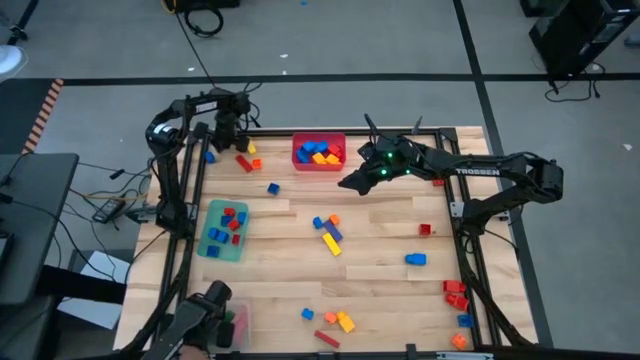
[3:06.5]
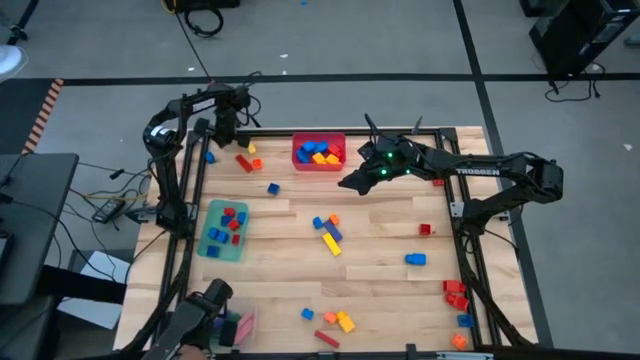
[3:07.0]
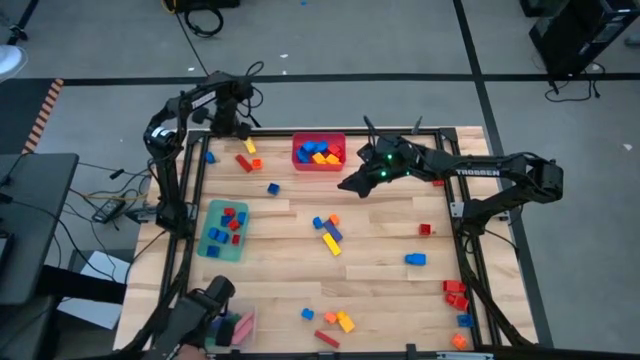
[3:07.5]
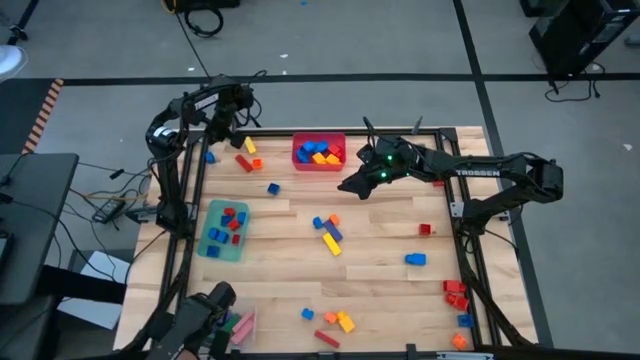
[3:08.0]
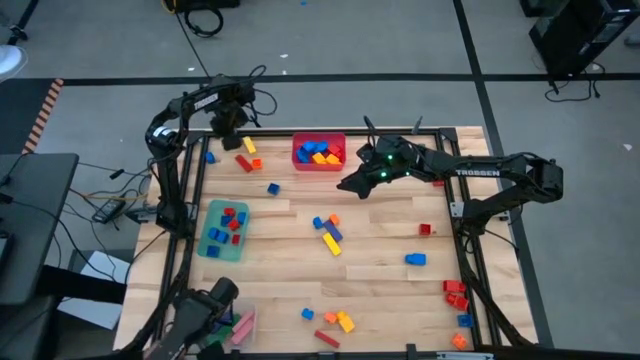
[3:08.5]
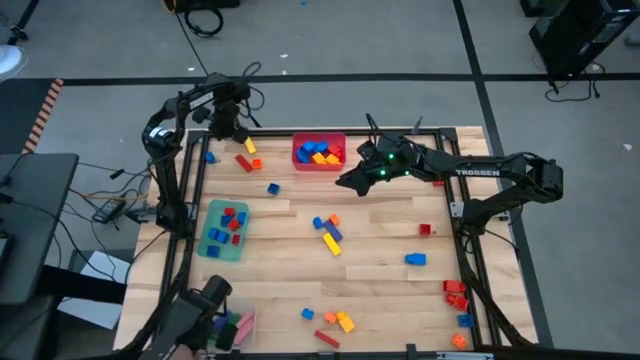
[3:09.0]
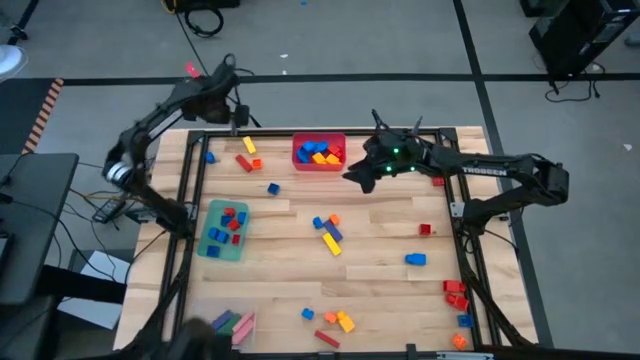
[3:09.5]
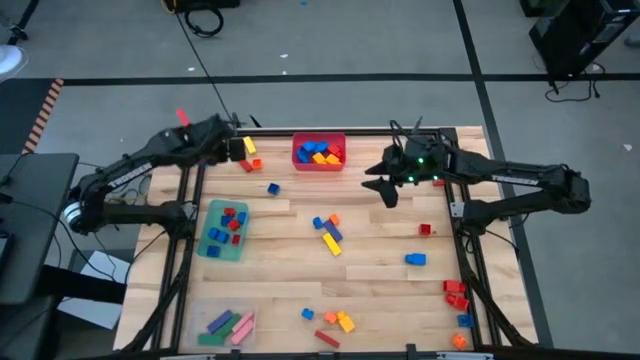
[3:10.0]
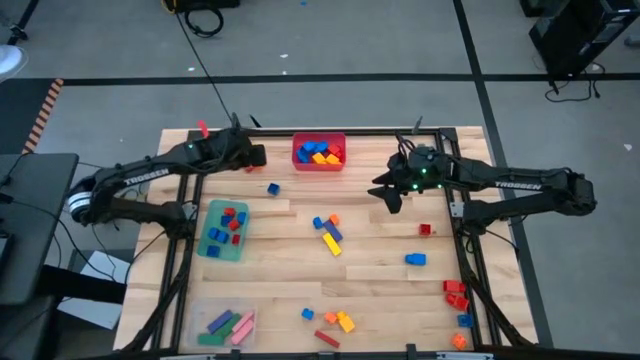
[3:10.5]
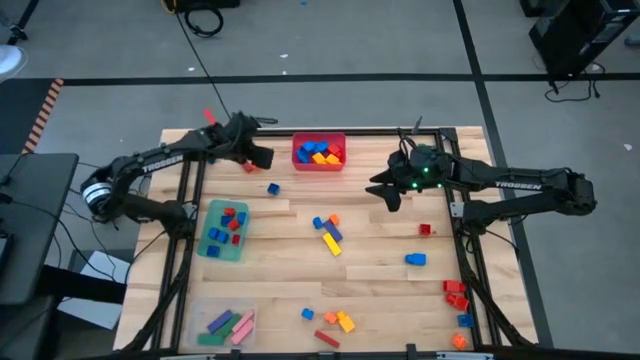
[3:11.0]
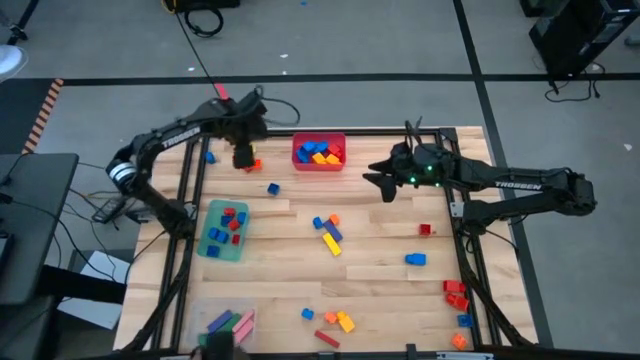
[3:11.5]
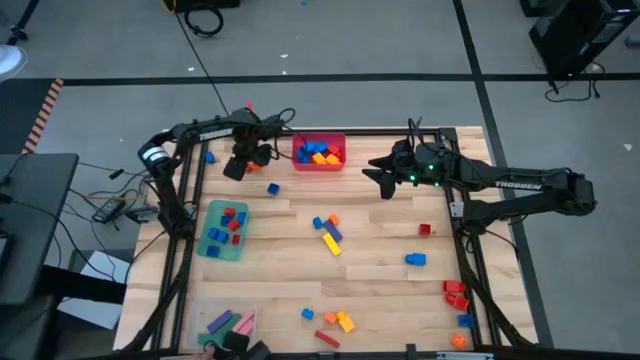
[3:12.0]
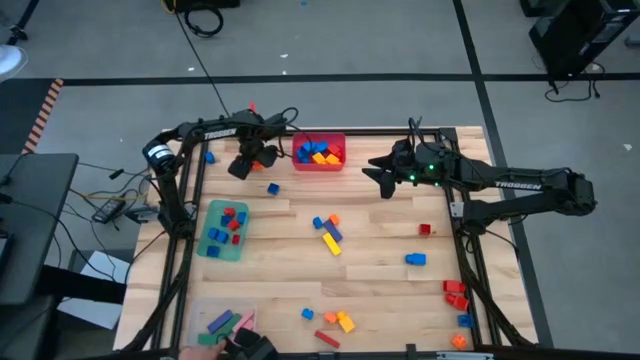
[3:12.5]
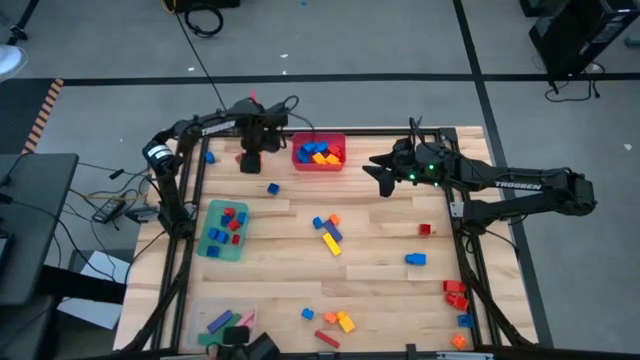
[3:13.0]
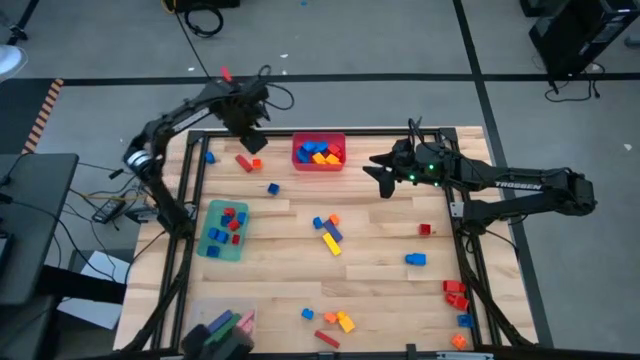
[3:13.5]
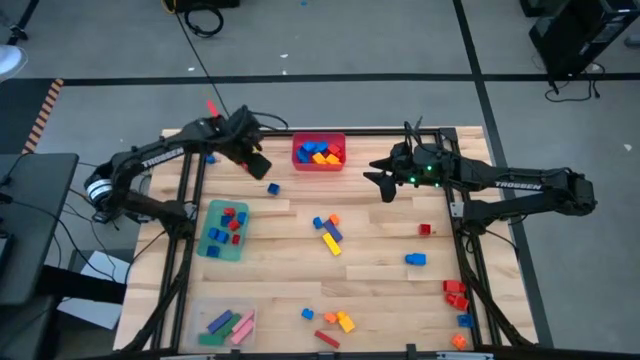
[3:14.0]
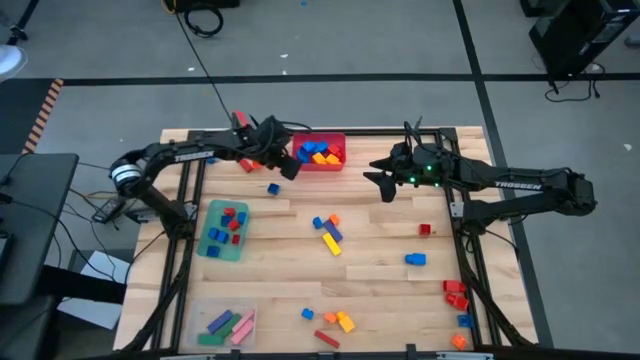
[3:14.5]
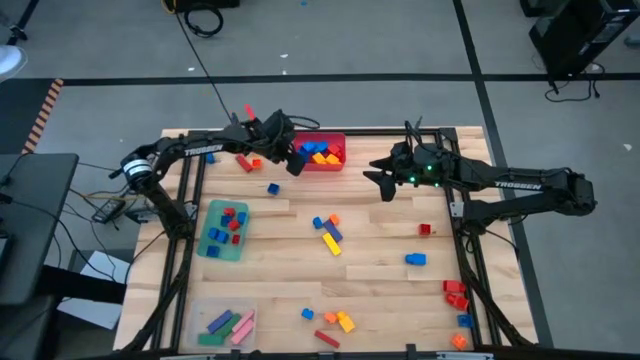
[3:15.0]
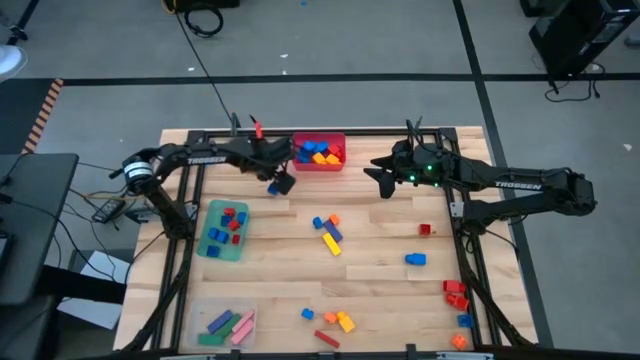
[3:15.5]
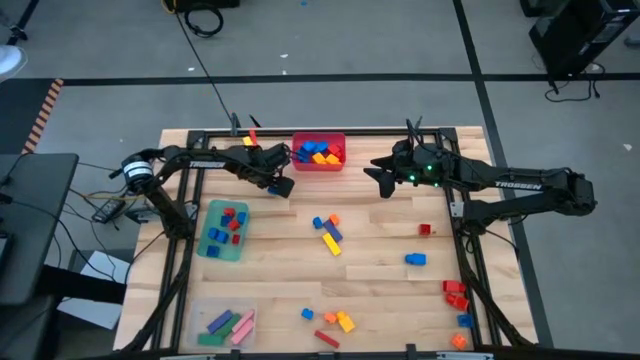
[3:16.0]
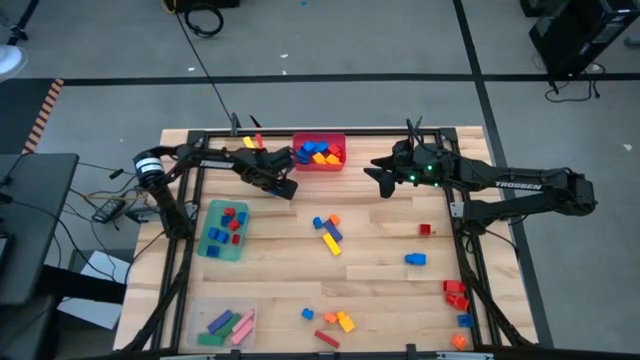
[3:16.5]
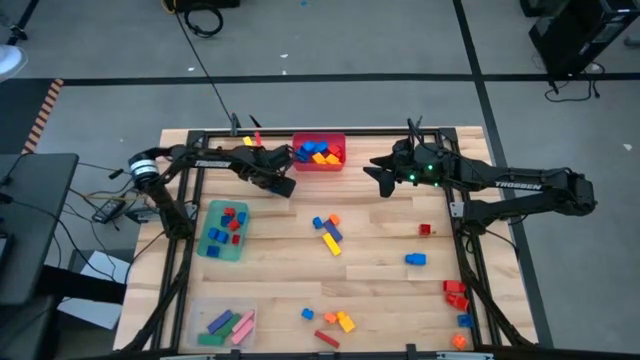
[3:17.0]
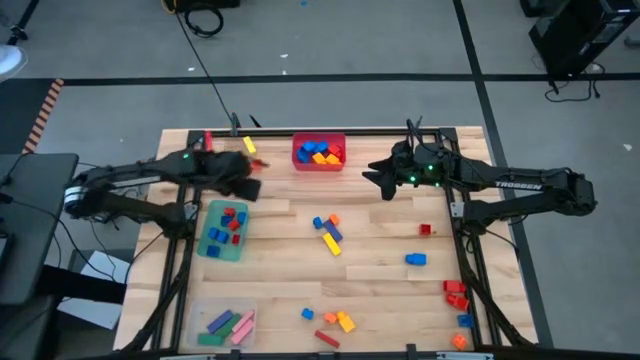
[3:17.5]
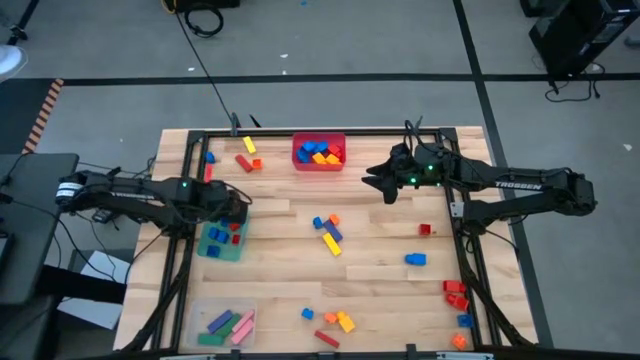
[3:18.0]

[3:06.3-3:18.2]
Task: Sort blocks by size
Put the blue 4 studded building block into the teal bin

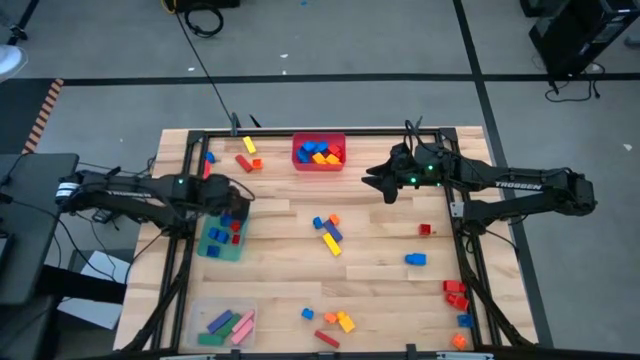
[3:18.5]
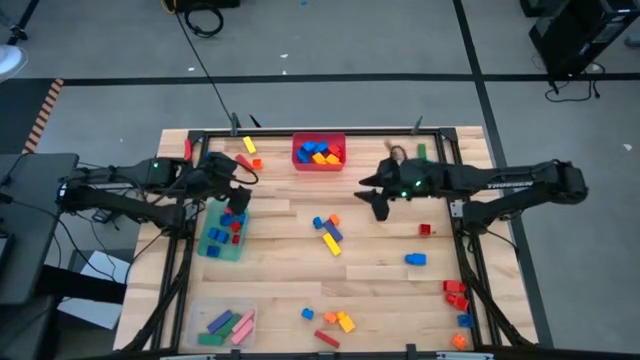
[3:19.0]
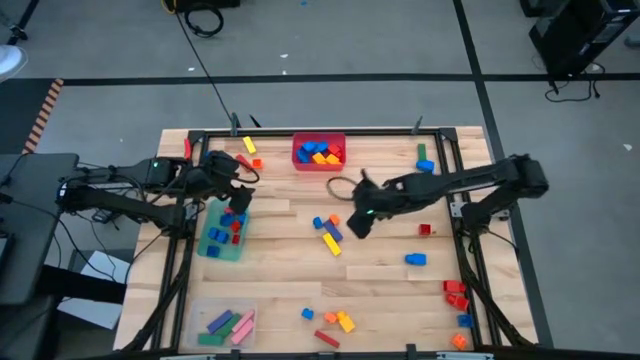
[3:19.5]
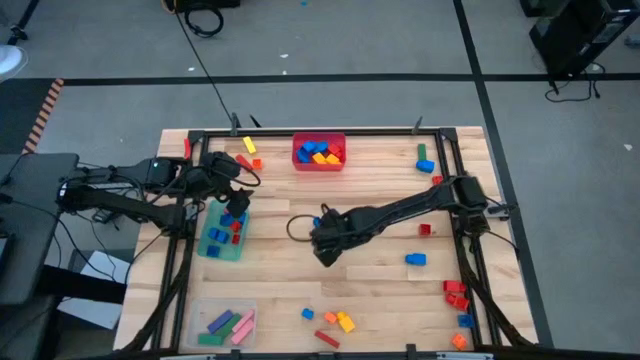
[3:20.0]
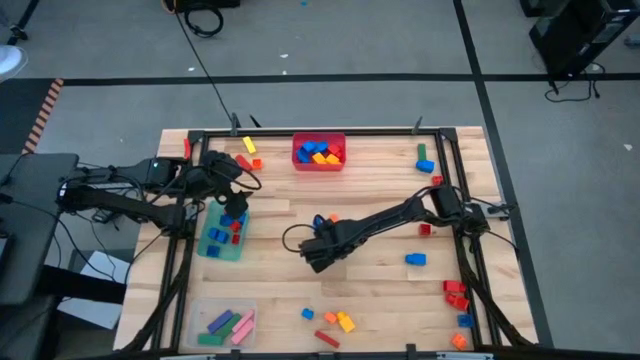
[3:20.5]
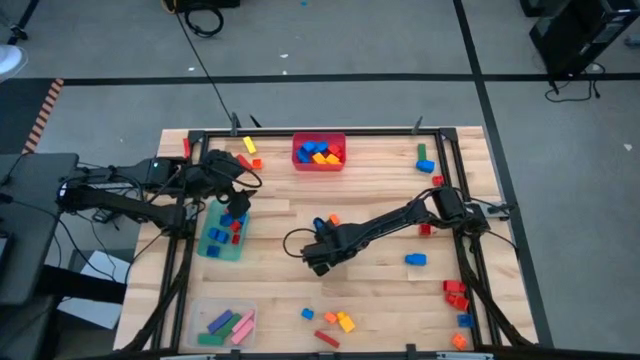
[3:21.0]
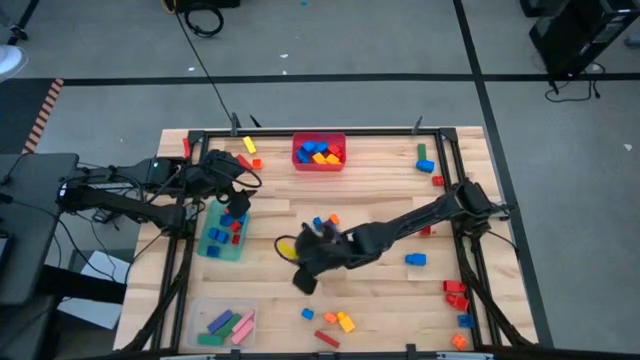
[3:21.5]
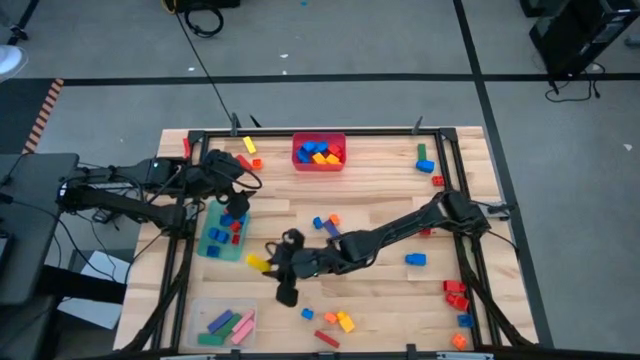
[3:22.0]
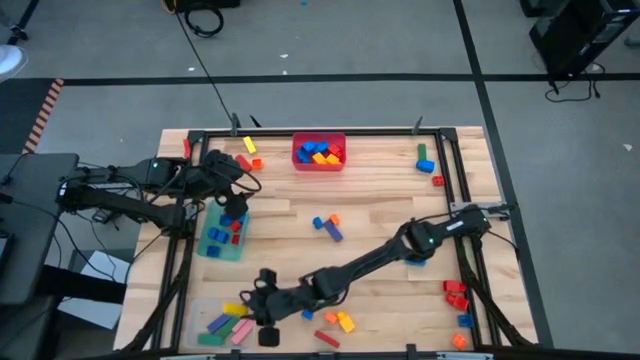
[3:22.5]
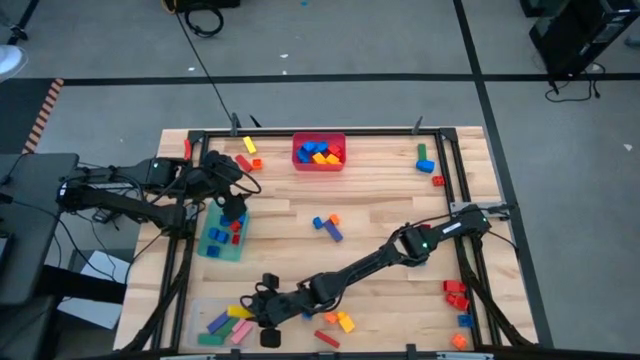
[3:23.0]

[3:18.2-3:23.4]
Put the yellow rectangle block into the transparent bin

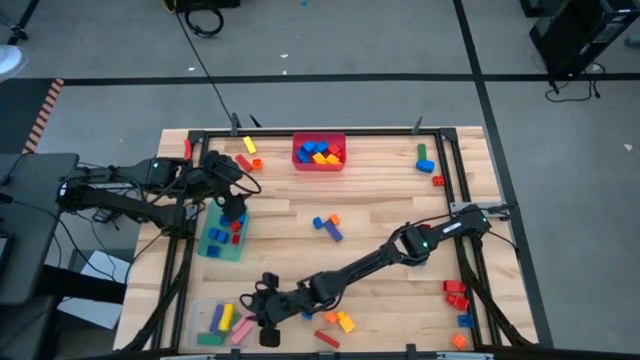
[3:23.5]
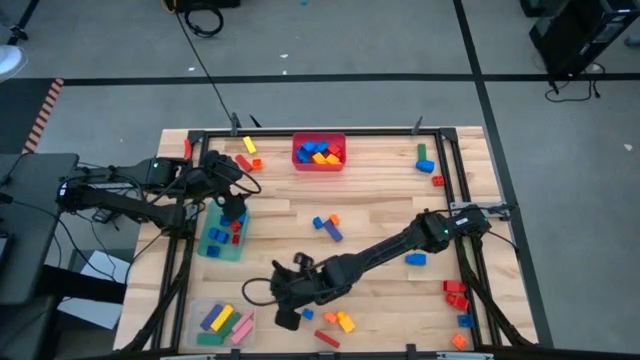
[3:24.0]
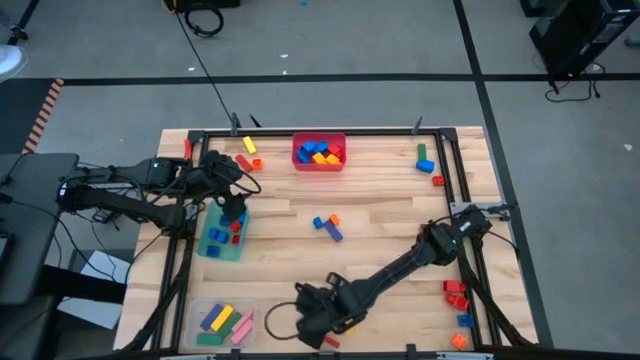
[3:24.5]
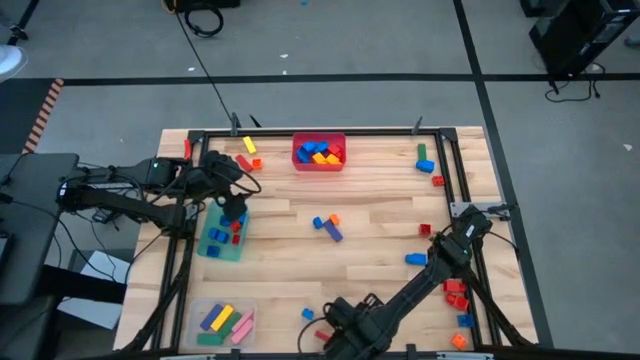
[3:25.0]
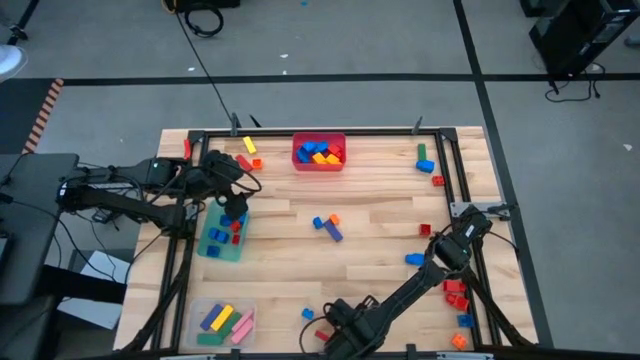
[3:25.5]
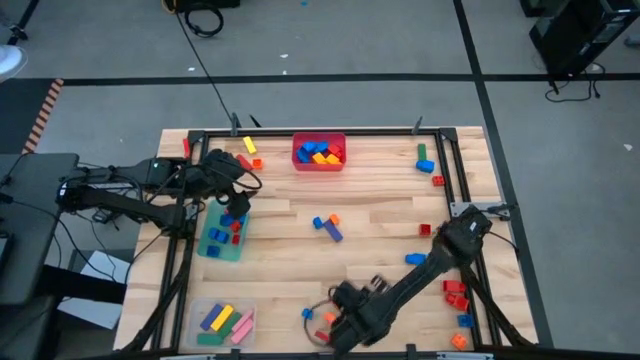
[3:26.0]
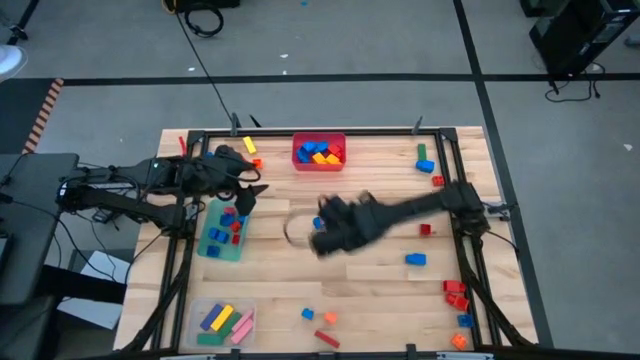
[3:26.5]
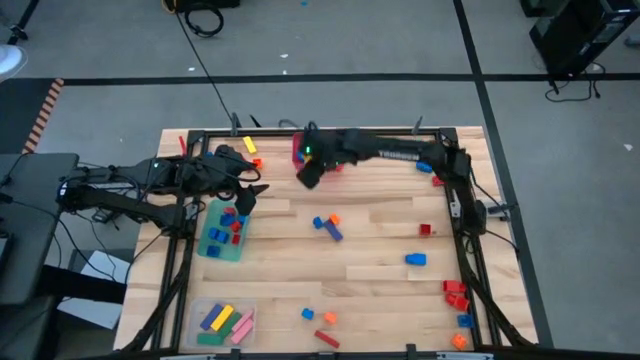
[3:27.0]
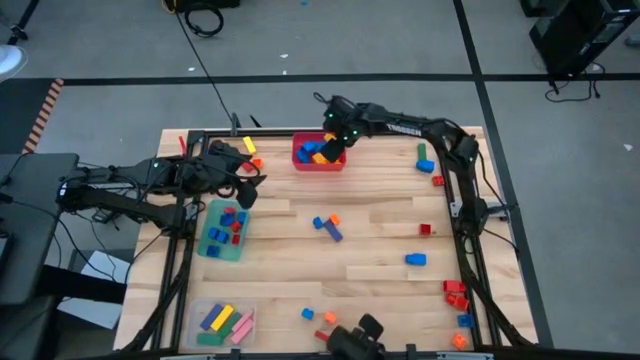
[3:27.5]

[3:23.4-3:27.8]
Put the yellow 1 studded building block into the red bin
